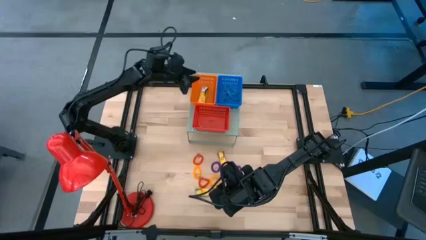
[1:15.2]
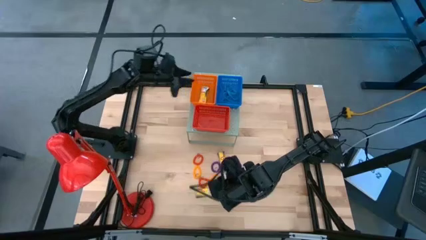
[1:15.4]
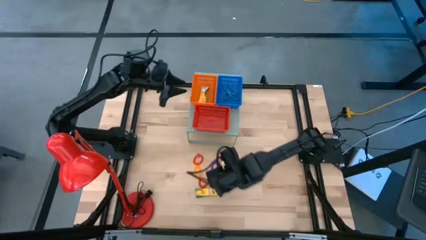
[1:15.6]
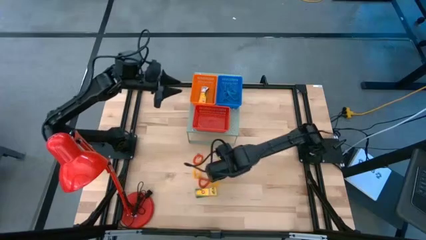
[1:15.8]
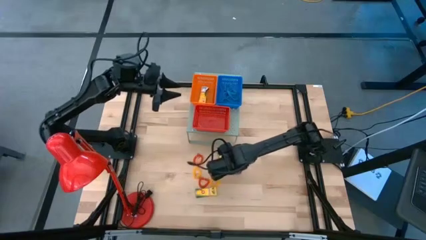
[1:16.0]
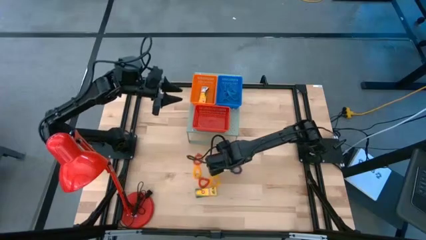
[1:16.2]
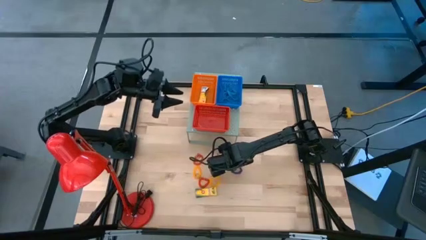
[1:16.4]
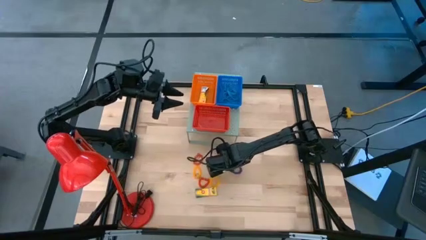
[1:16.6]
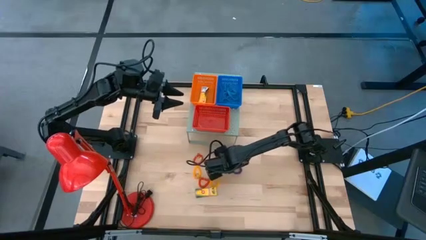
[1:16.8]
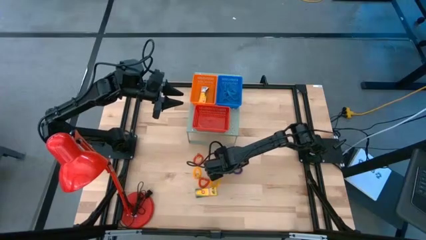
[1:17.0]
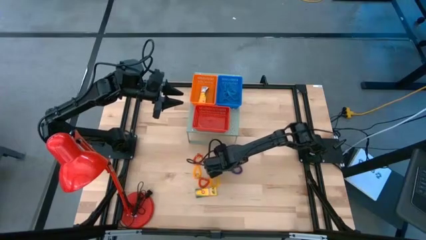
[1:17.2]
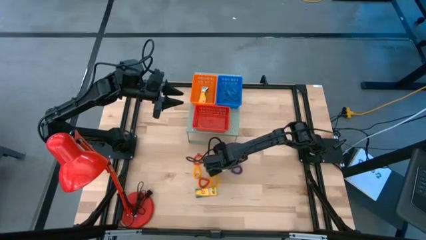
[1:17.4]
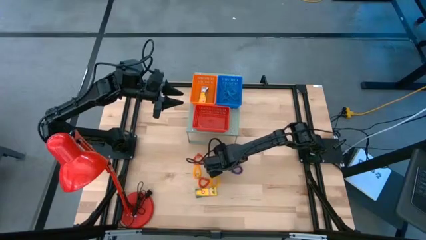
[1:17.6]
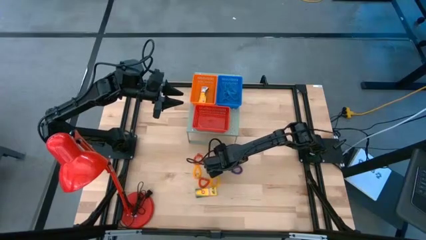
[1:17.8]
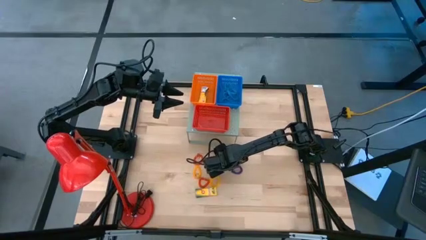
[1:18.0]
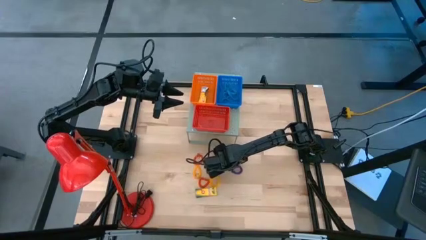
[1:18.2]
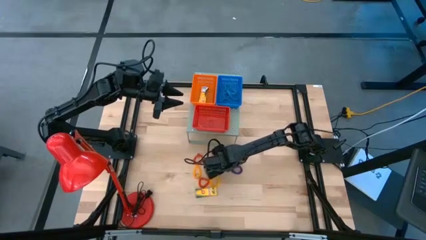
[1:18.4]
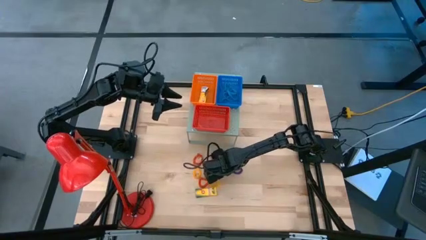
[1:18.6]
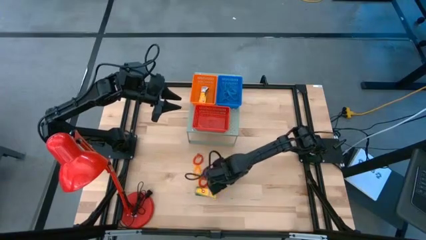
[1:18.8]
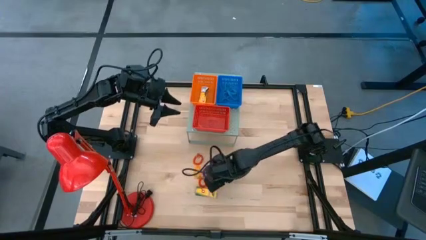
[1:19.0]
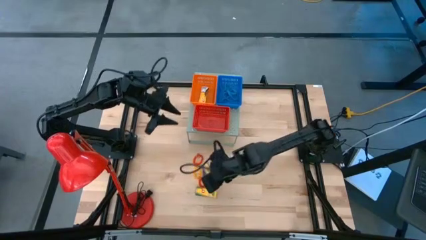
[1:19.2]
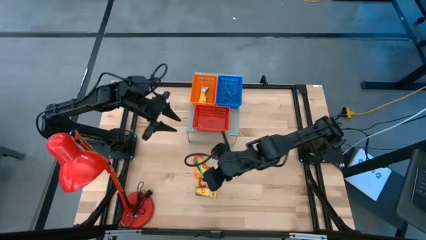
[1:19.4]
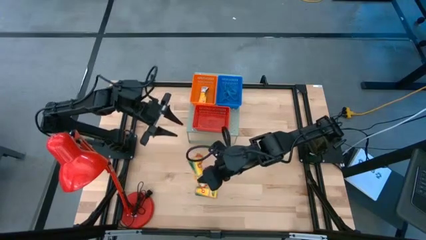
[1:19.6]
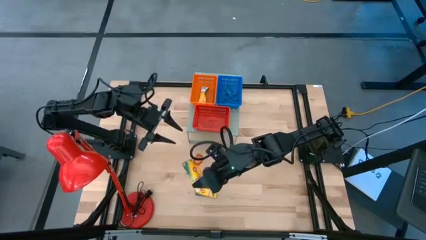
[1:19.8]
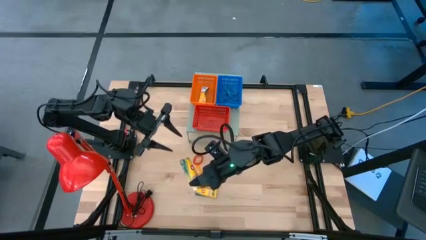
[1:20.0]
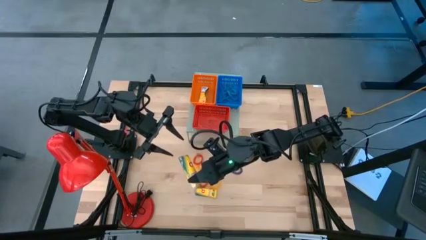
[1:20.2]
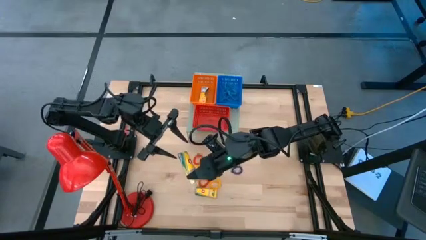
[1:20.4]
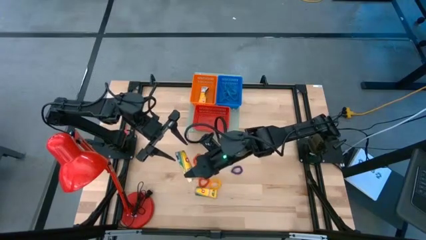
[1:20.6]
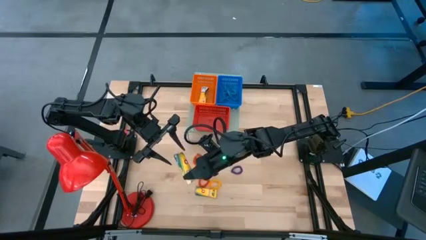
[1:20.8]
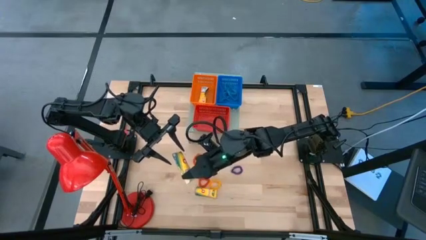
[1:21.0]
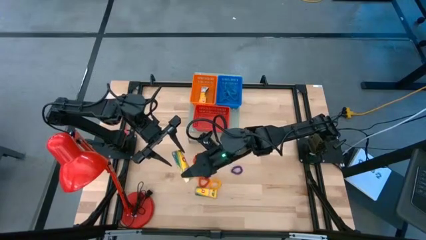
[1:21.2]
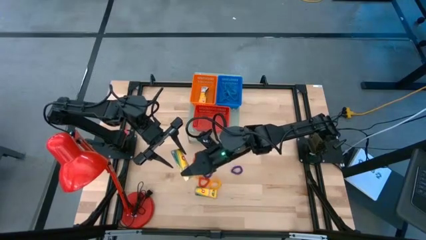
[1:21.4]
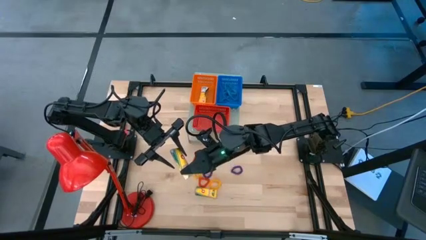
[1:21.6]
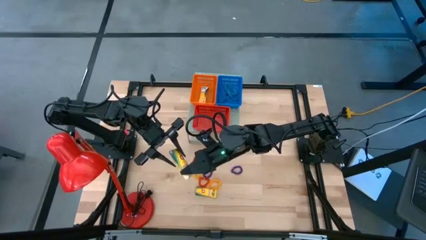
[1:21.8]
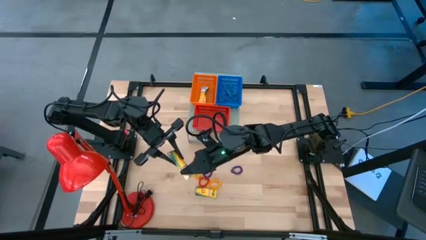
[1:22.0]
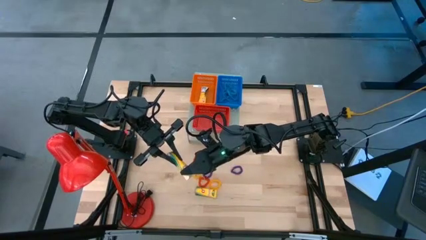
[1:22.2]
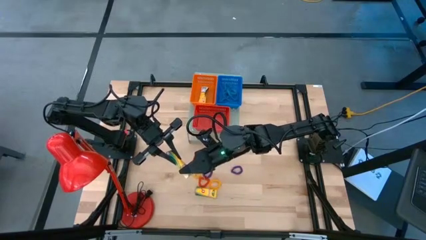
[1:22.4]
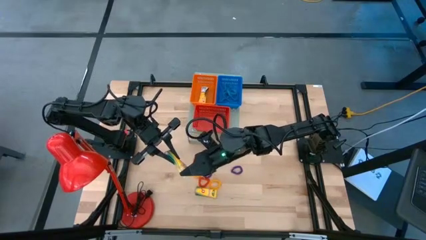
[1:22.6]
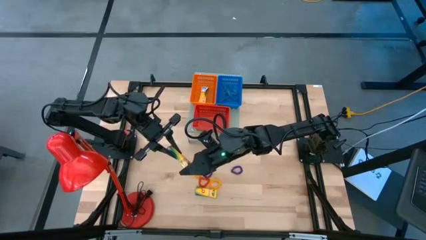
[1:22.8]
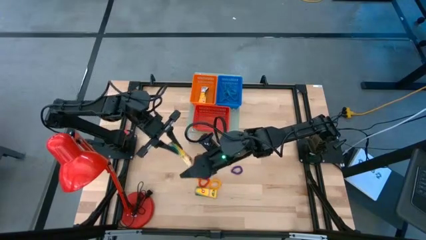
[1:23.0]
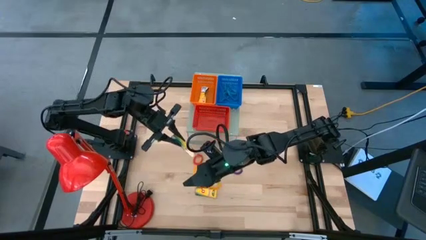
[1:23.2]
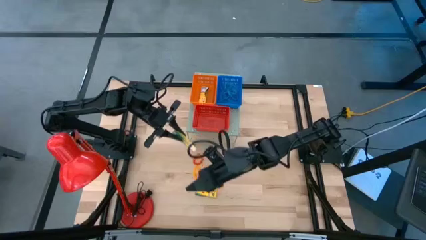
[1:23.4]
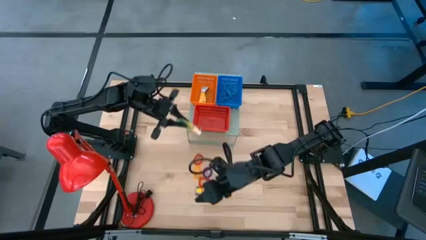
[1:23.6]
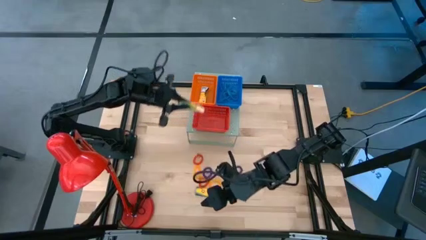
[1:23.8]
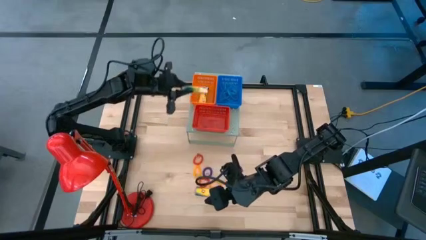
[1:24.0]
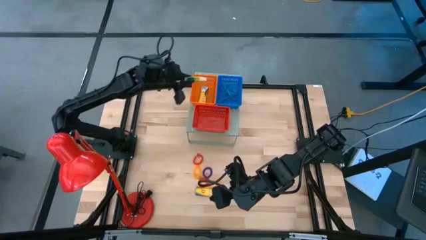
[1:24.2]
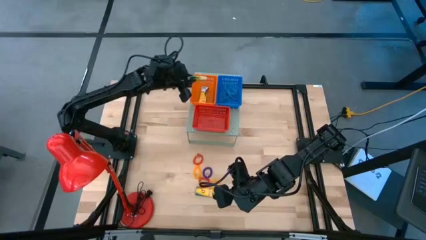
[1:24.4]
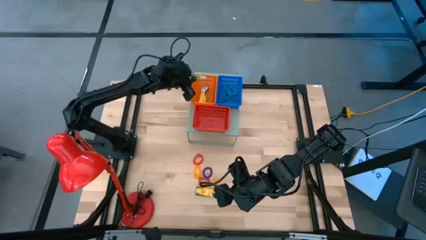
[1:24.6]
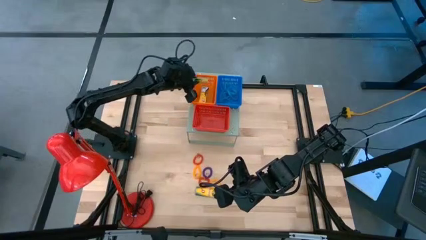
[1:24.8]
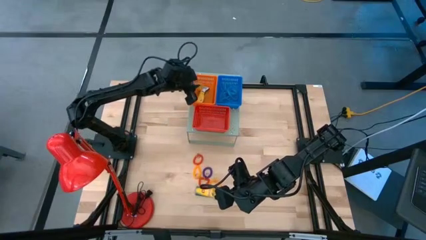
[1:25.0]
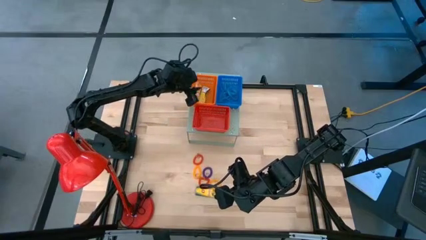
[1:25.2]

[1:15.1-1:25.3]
Task: Pick & Place Office Desk Supplies
Put the yellow crayon box into the orange bin

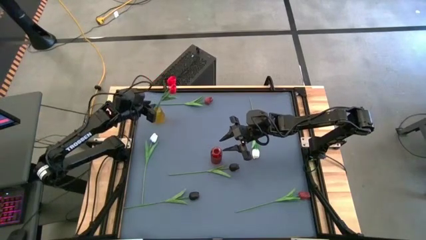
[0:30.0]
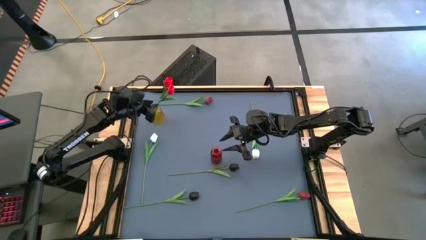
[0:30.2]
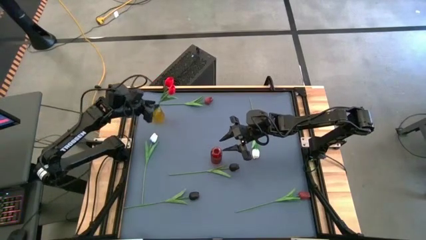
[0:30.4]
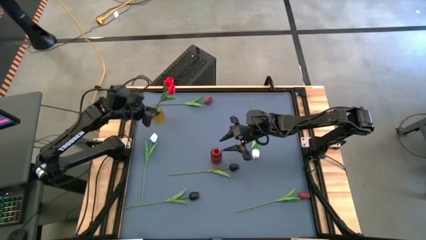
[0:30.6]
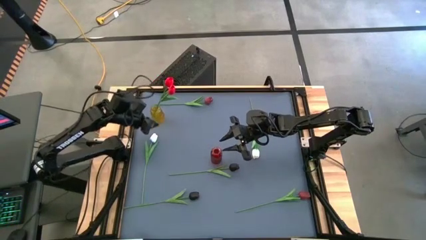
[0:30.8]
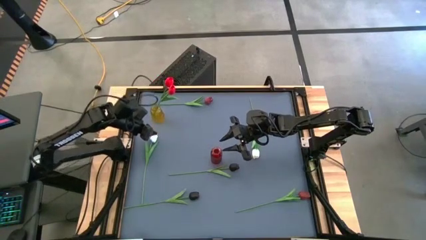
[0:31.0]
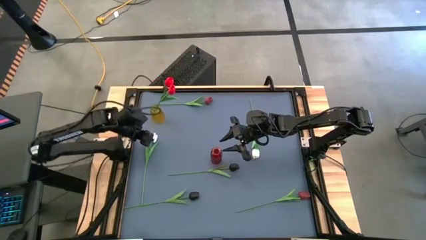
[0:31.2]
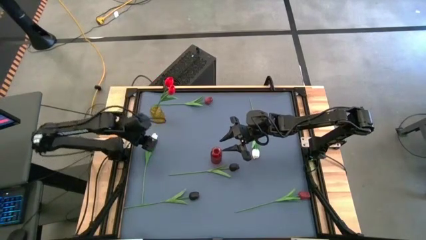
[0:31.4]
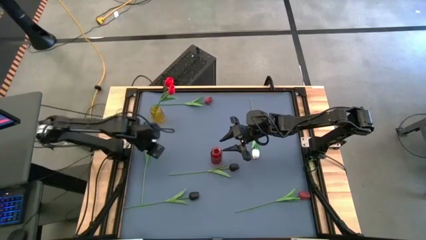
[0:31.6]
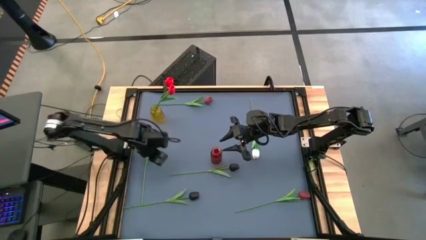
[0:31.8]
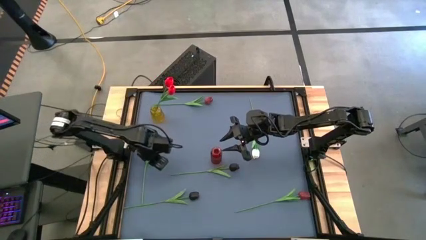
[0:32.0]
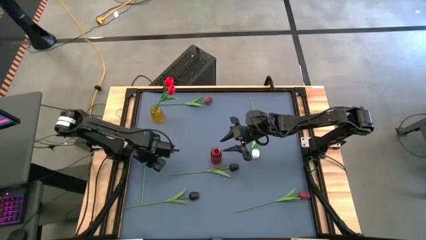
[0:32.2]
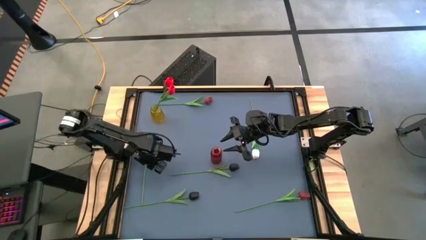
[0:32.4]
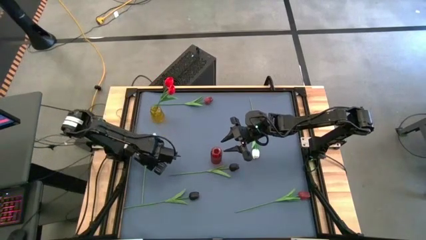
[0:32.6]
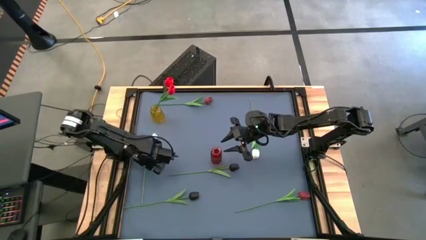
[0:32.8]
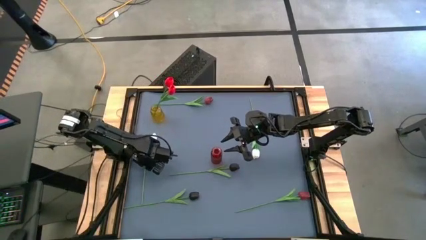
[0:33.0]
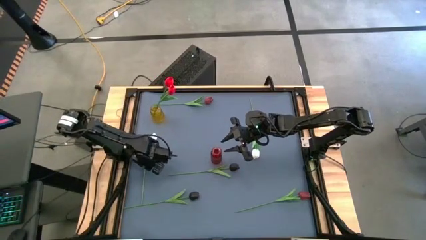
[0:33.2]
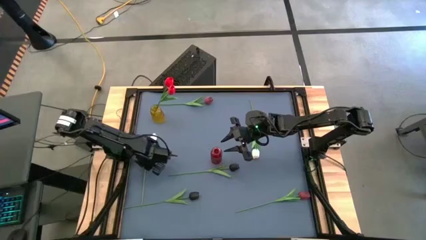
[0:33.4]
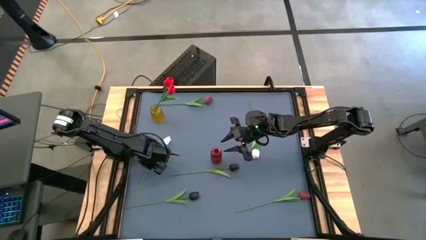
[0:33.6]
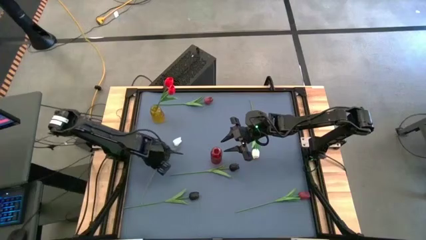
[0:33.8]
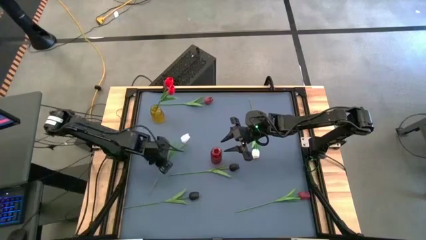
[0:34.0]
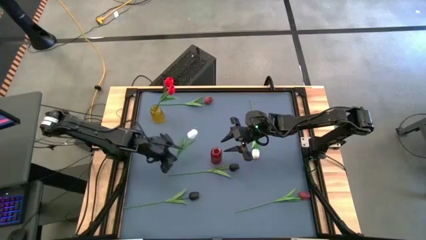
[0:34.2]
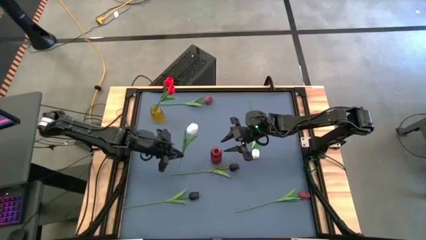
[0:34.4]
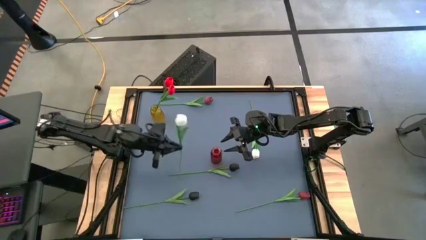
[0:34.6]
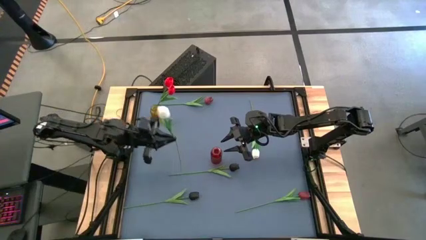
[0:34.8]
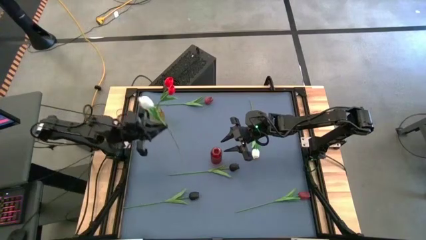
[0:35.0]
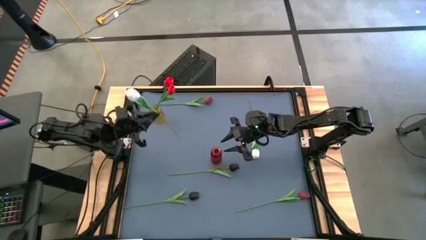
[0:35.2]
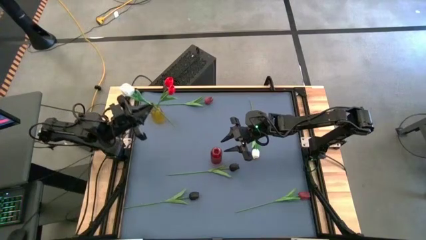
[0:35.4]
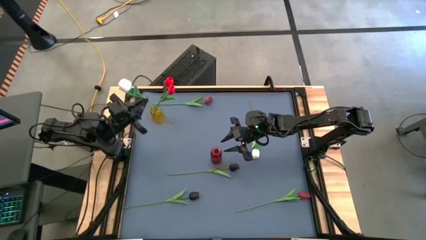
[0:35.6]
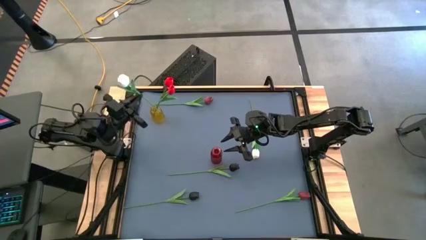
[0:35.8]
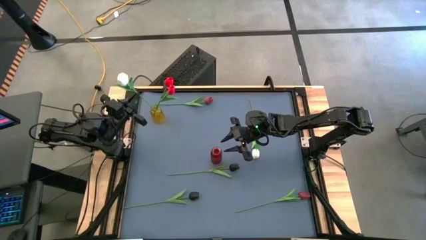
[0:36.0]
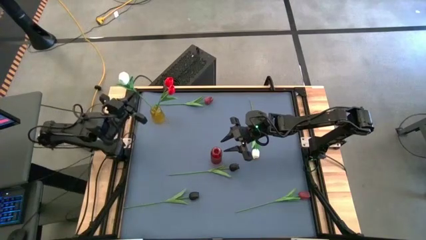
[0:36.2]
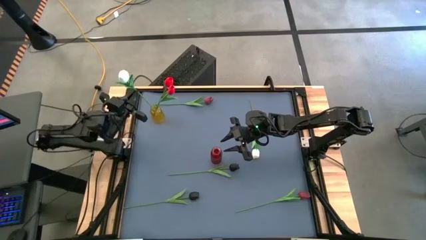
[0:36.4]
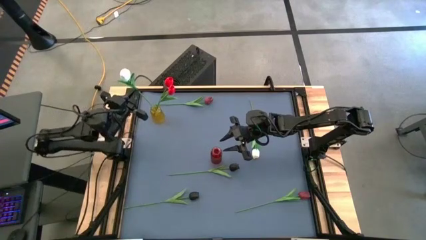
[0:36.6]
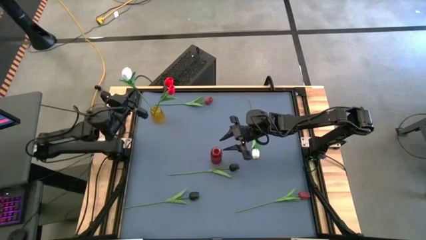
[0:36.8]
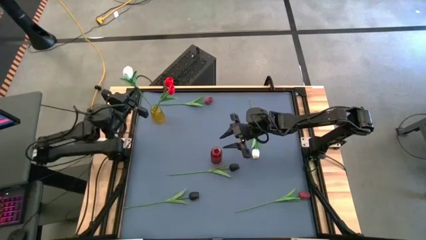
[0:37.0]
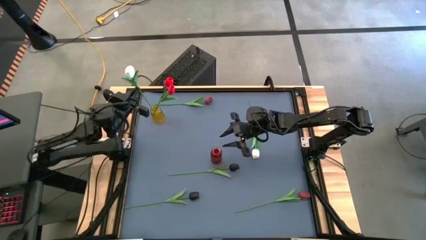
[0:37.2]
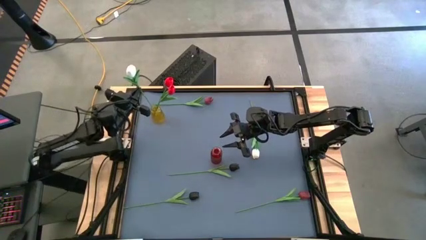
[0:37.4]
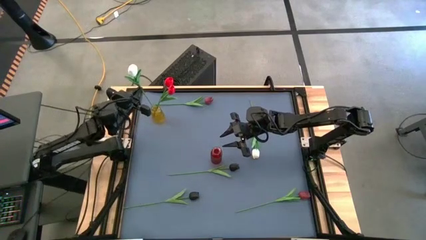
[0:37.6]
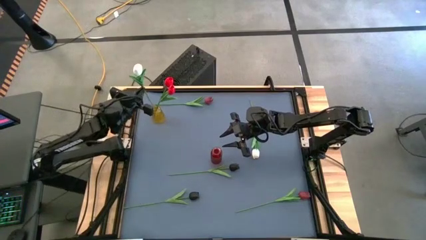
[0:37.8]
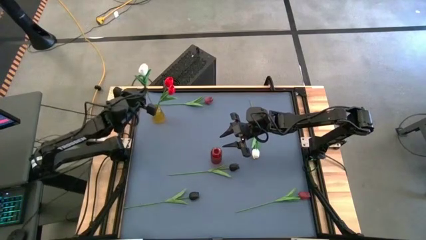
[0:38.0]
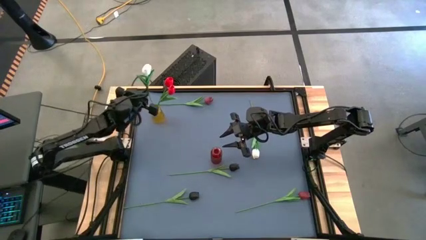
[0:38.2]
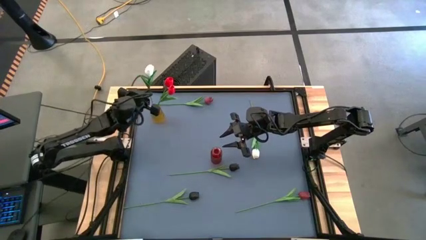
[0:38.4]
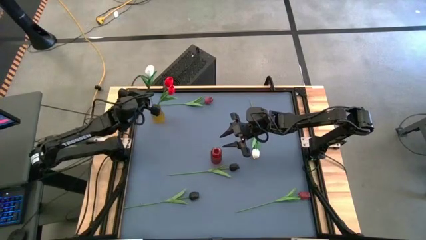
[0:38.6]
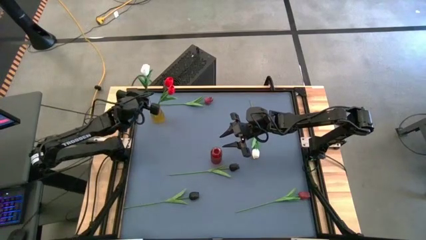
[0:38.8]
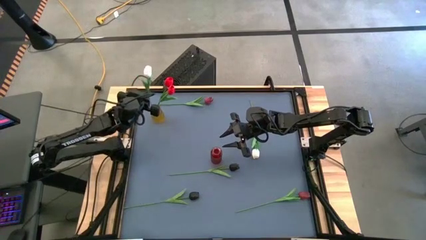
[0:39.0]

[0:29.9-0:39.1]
Task: Sort flowers into vase by color
Put the left white tulip into the yellow vase
